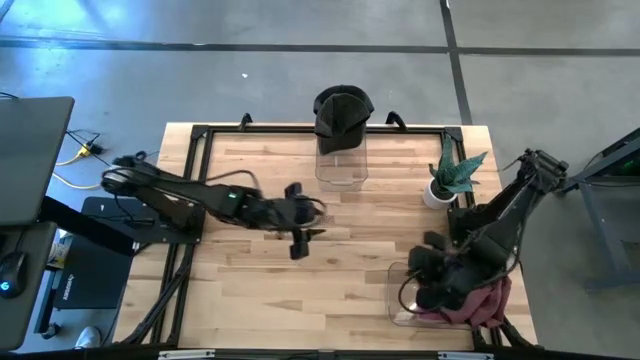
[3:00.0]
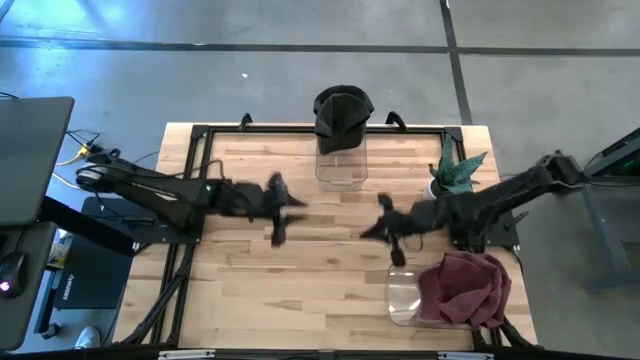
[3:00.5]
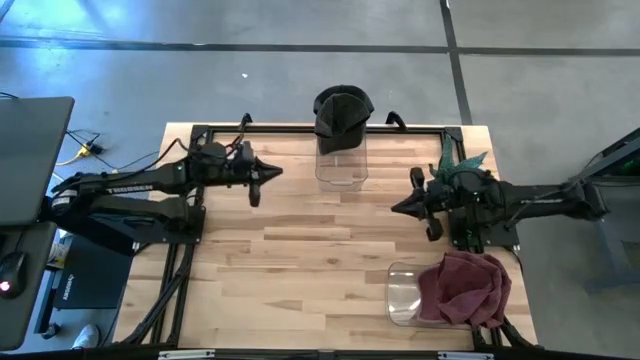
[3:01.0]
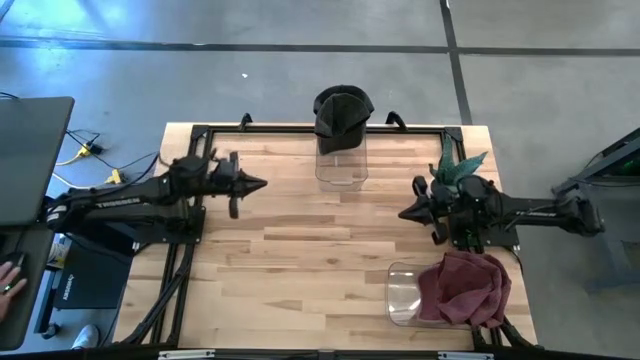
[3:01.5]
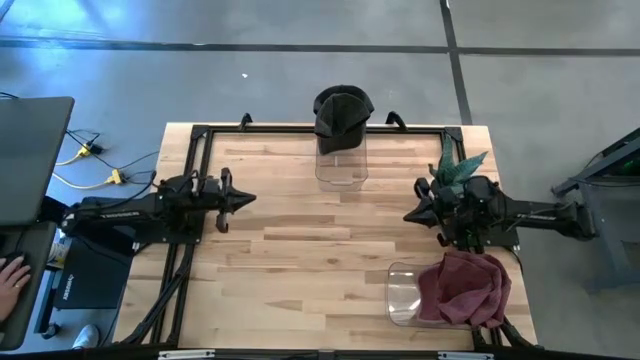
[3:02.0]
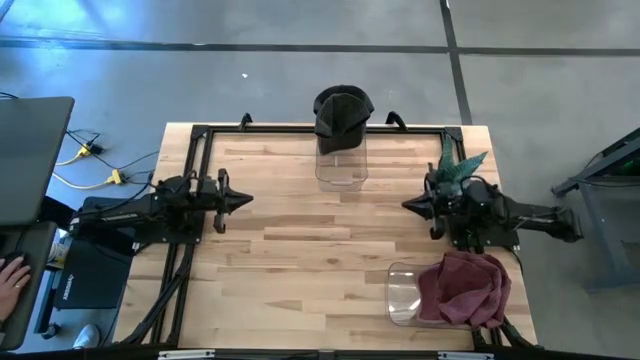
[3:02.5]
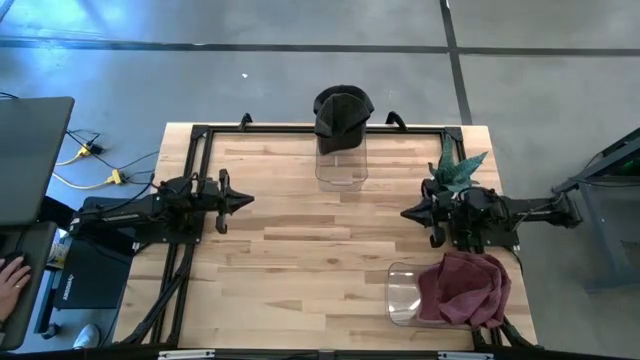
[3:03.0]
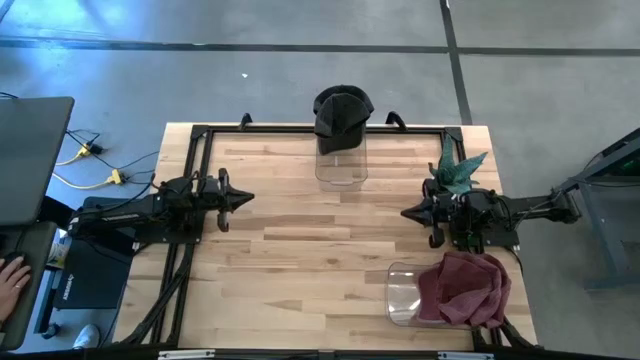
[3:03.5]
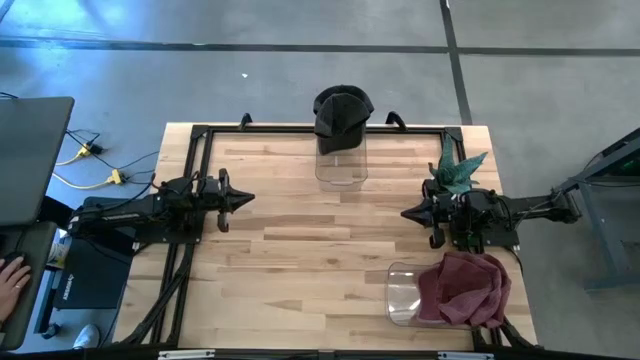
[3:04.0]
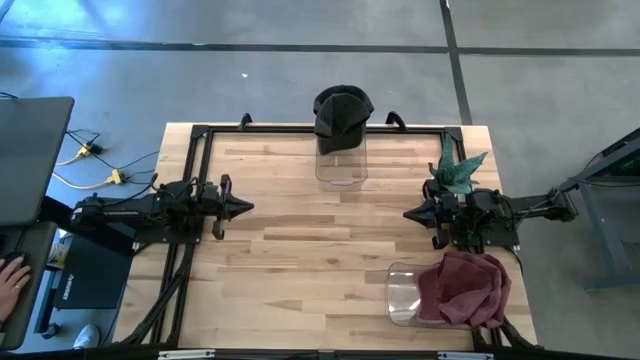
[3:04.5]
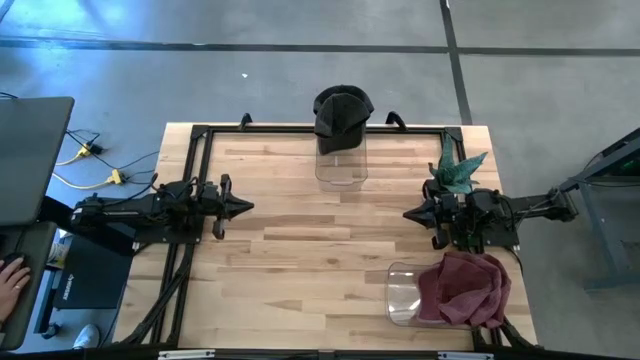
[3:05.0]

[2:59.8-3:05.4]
Task: Pick & Place hat
Return to Home Position

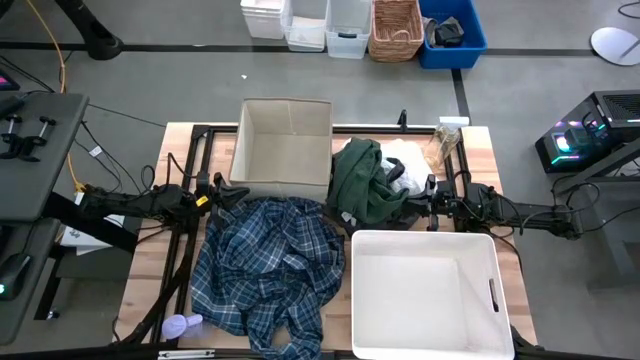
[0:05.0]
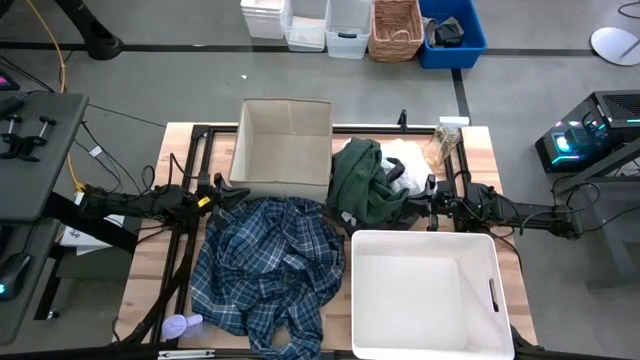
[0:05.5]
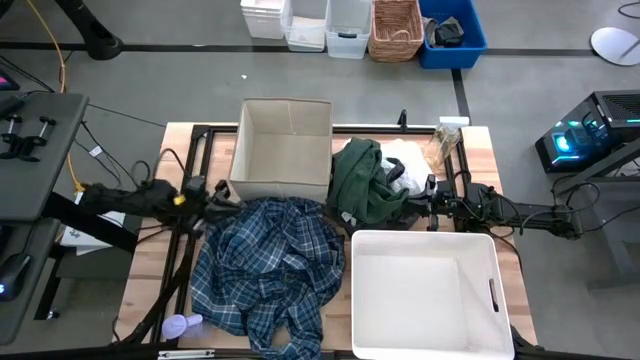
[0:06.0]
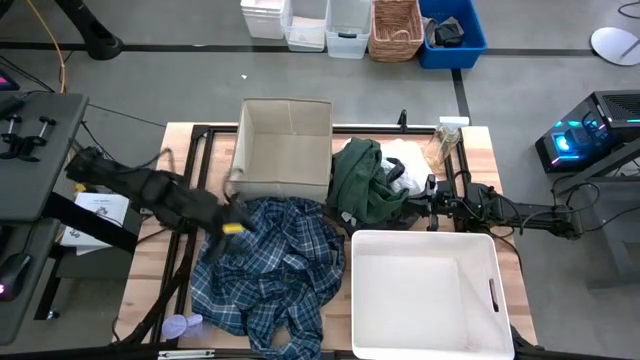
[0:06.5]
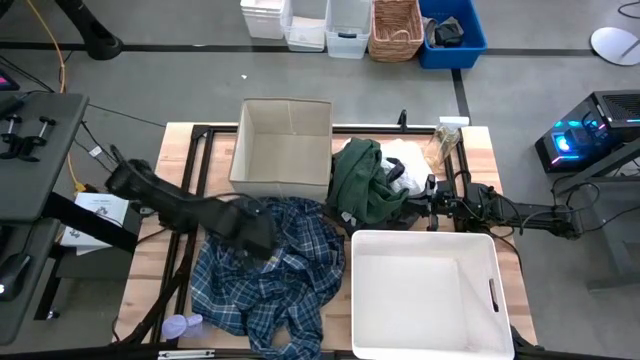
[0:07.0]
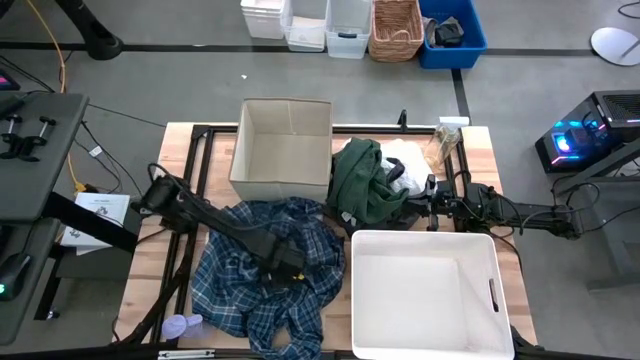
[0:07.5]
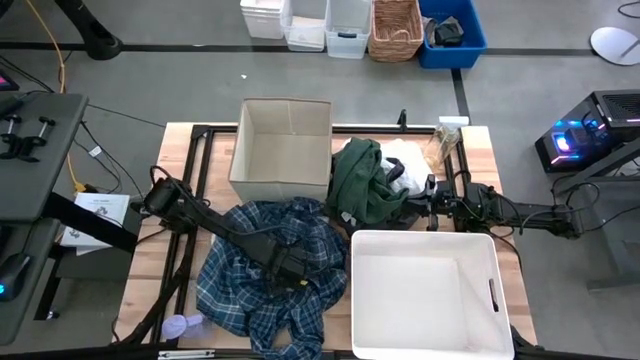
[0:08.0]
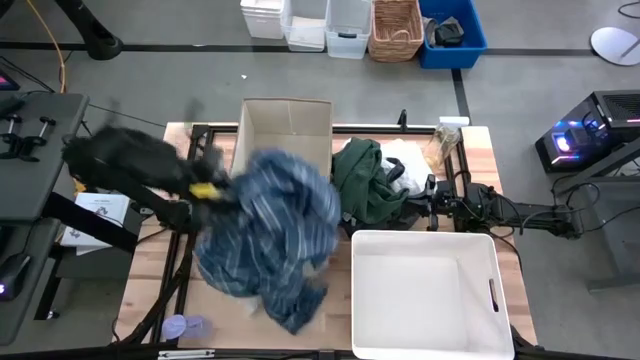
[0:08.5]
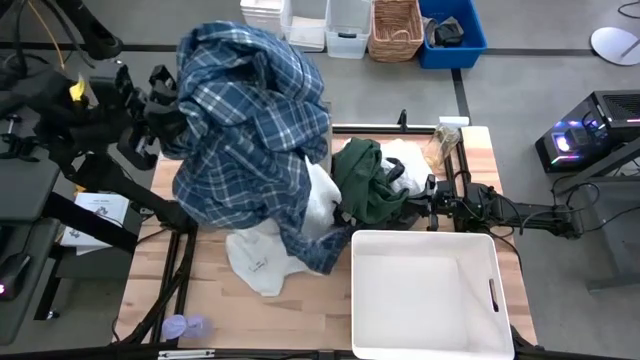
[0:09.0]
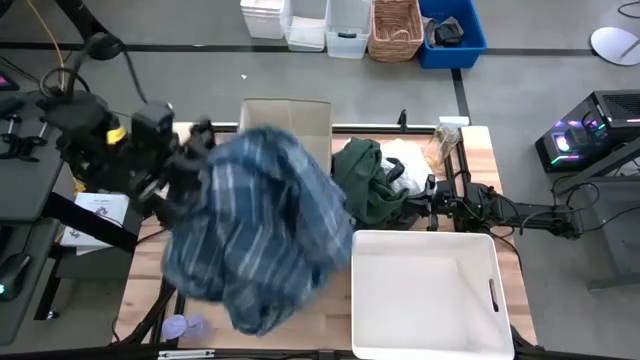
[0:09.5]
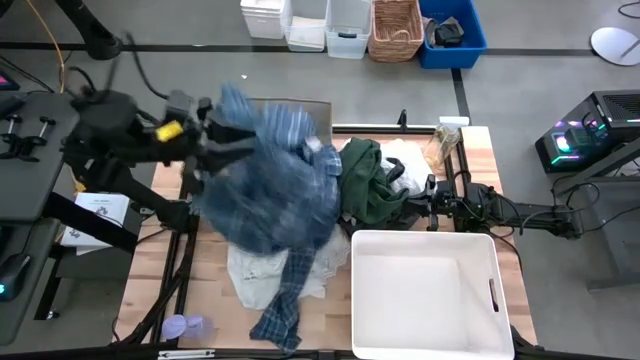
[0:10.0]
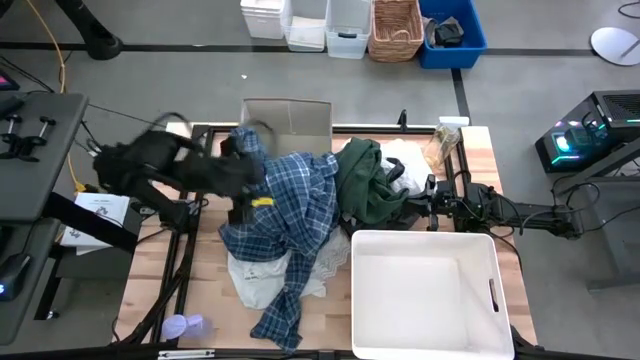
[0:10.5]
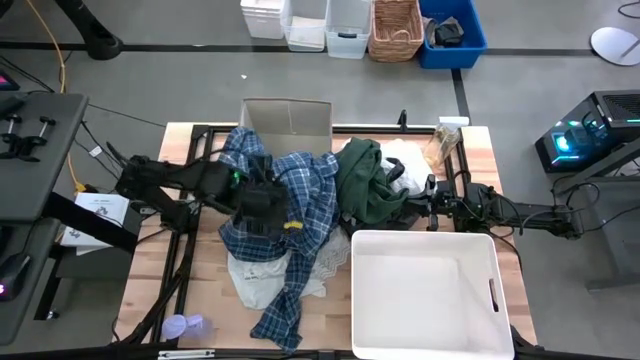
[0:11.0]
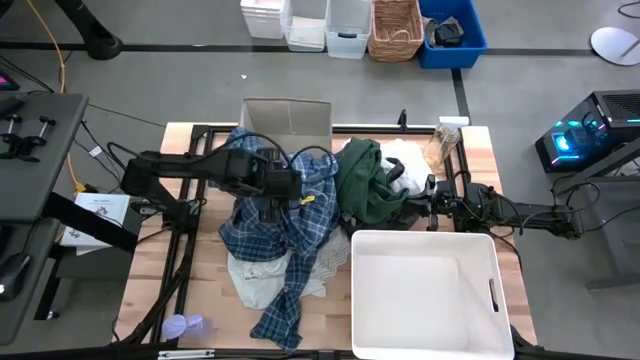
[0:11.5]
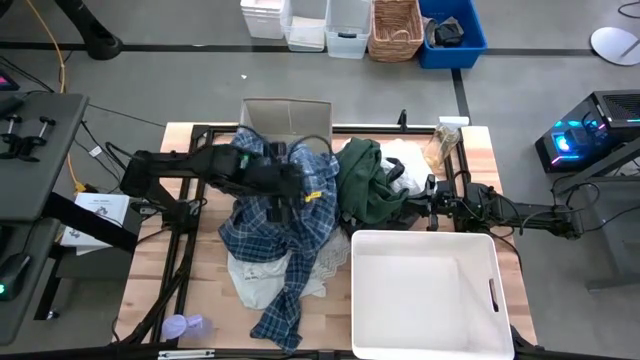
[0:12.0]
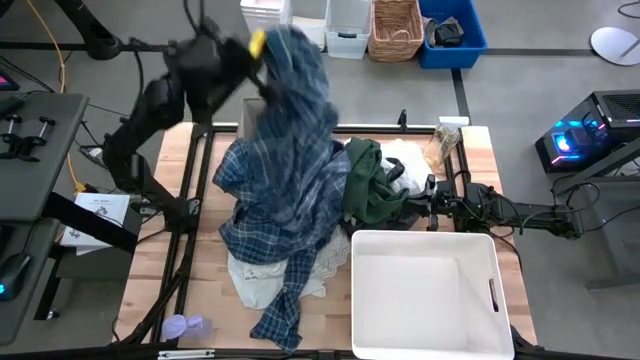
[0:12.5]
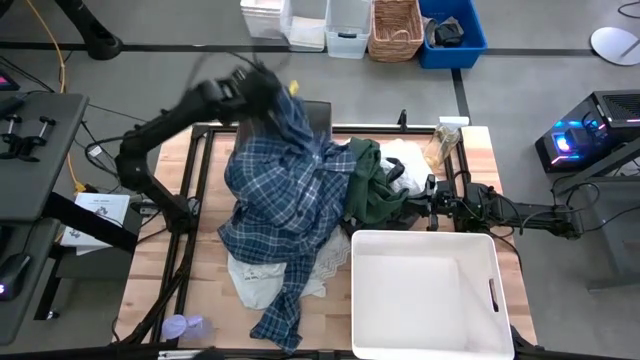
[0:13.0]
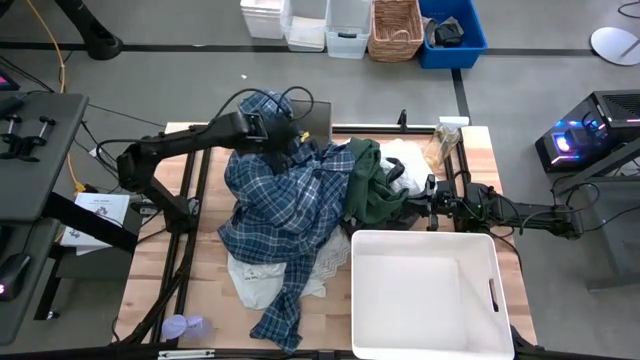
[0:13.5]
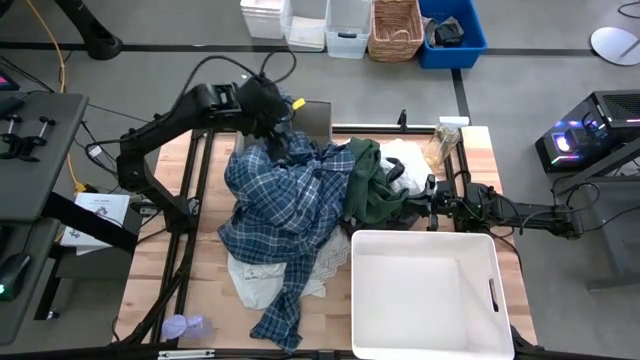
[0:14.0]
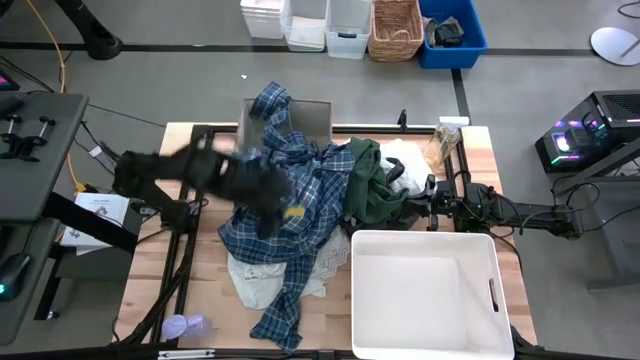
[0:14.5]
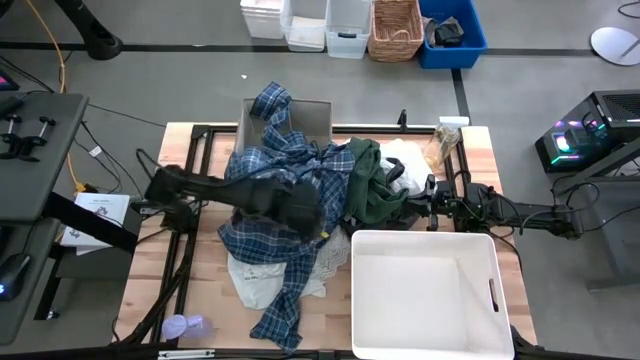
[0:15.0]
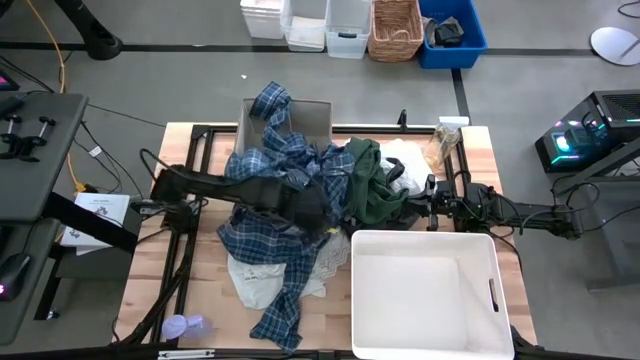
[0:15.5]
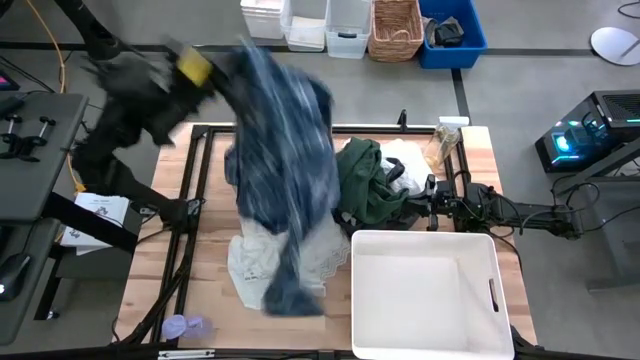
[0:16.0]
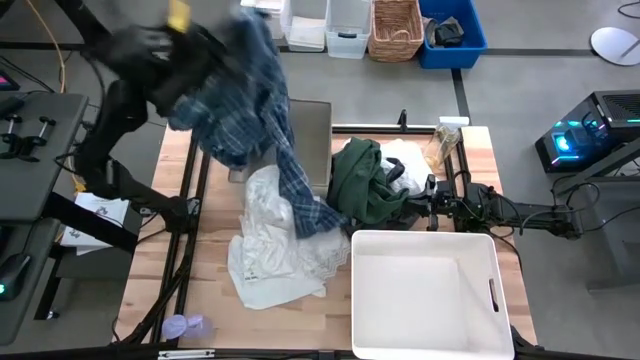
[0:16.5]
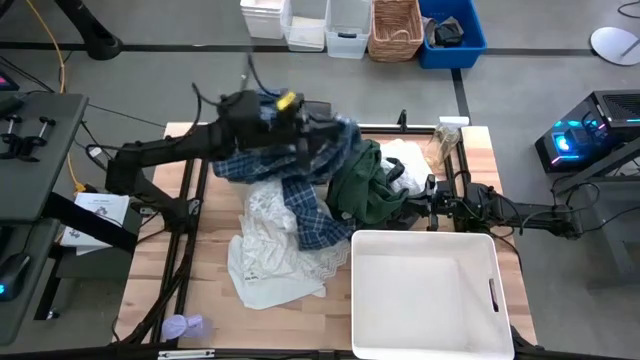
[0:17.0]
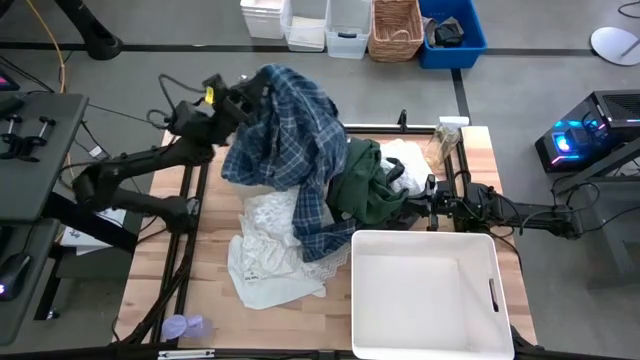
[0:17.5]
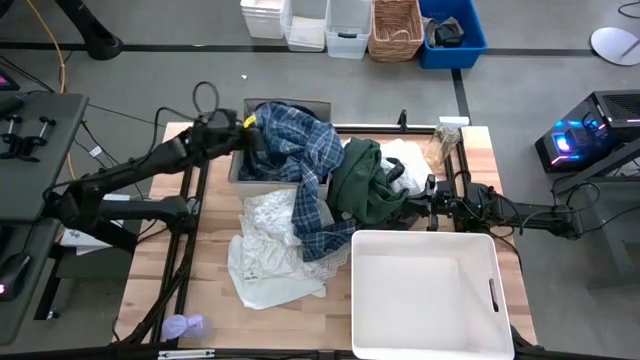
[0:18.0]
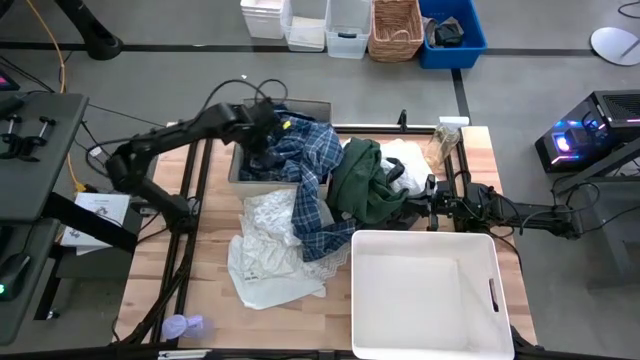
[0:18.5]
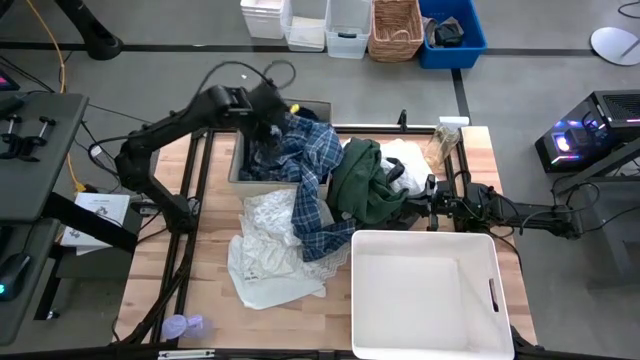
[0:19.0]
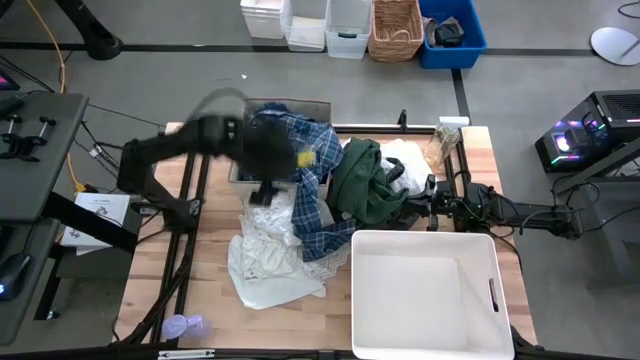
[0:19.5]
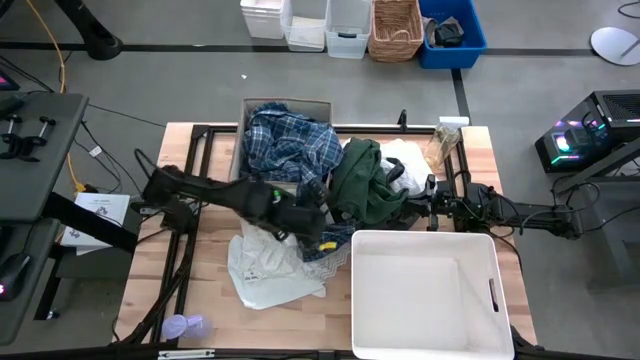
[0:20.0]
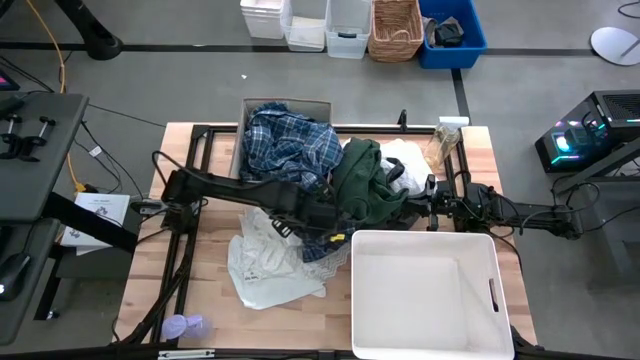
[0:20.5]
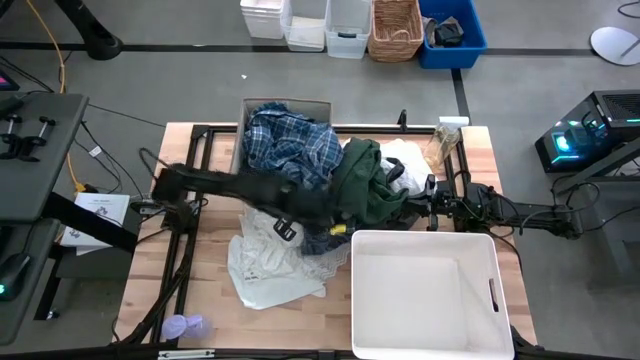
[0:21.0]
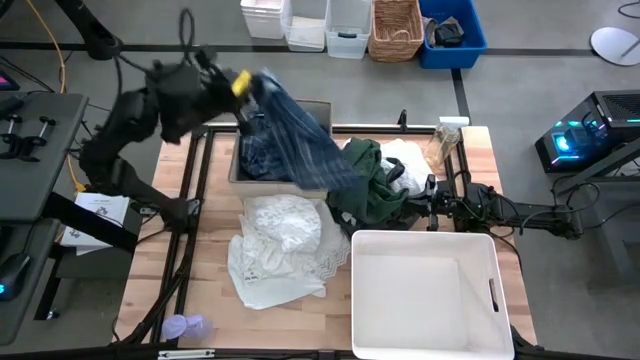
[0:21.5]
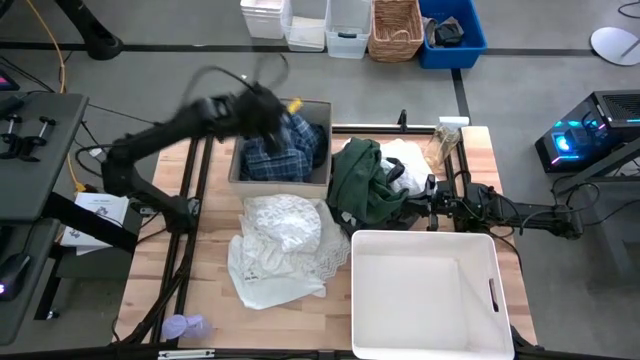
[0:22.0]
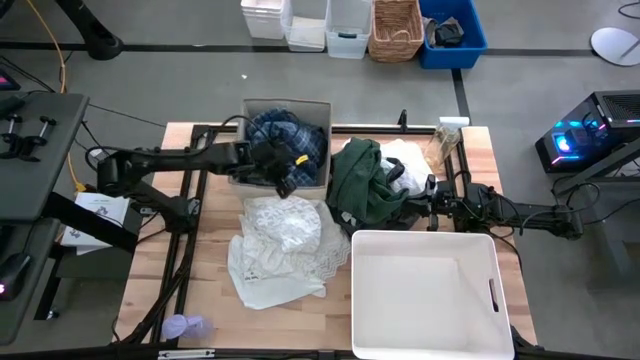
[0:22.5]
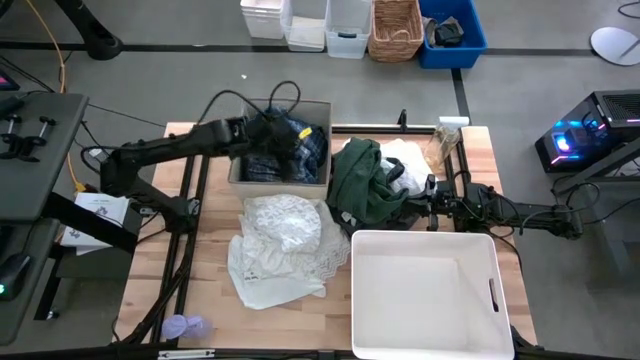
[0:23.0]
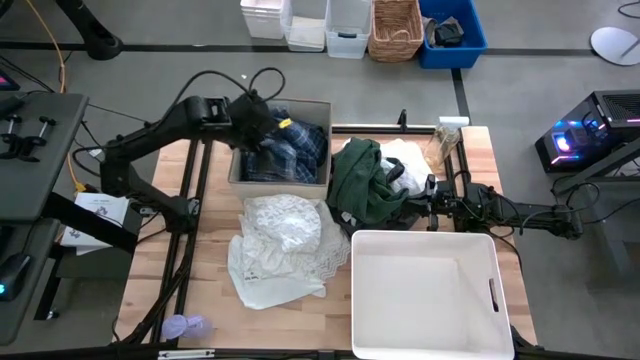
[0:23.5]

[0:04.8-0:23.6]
Task: Sort clothes
Put the dark blue long sleeve polo into the laundry organizer
